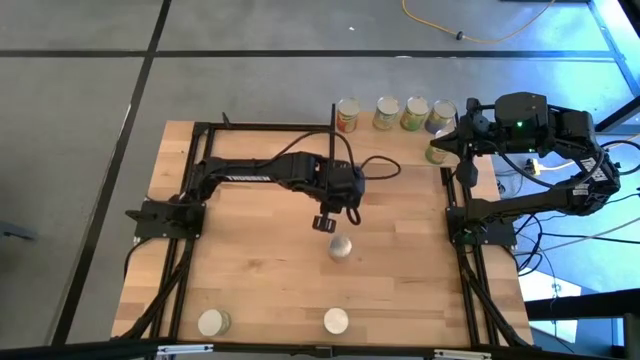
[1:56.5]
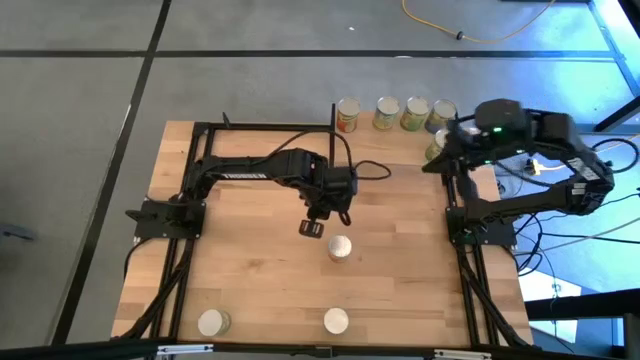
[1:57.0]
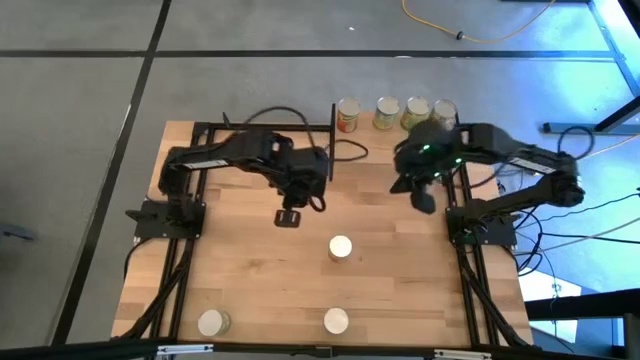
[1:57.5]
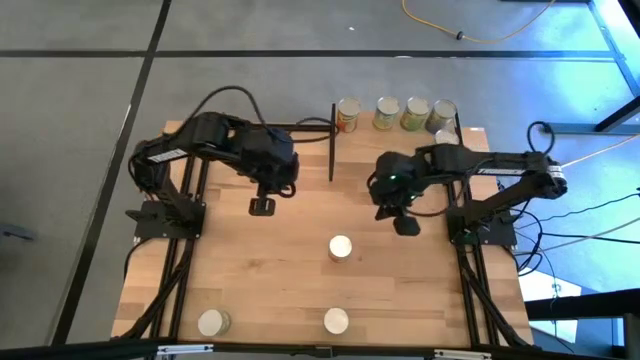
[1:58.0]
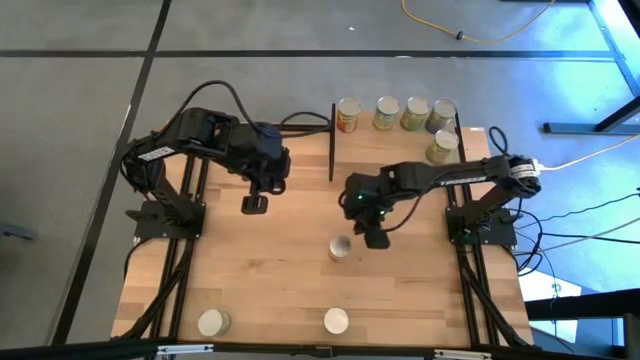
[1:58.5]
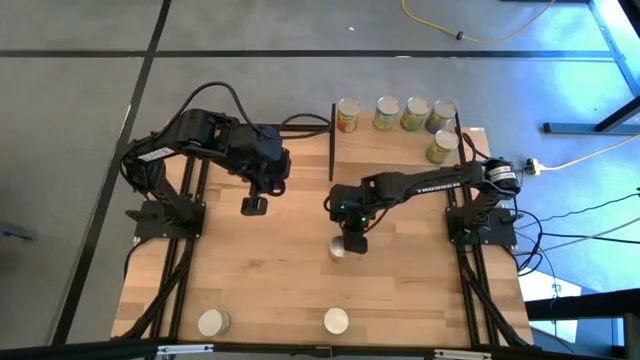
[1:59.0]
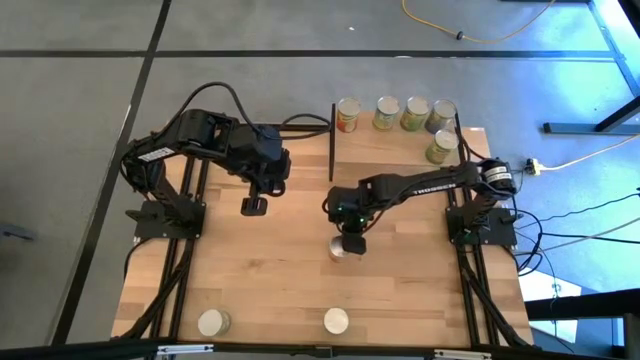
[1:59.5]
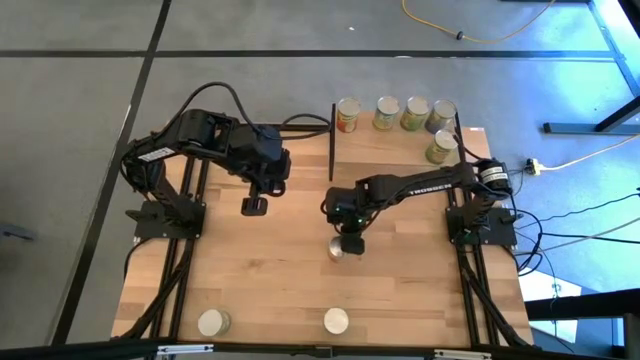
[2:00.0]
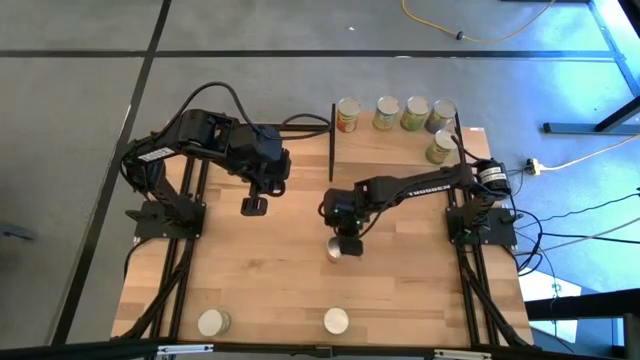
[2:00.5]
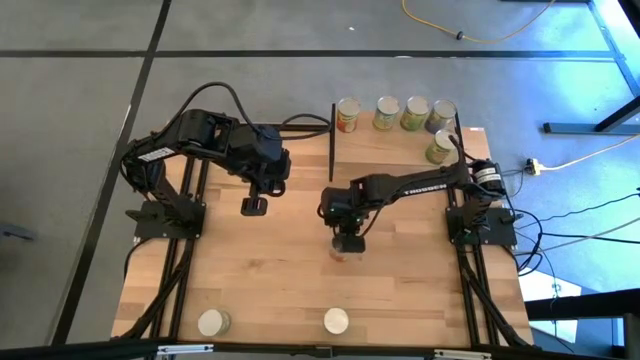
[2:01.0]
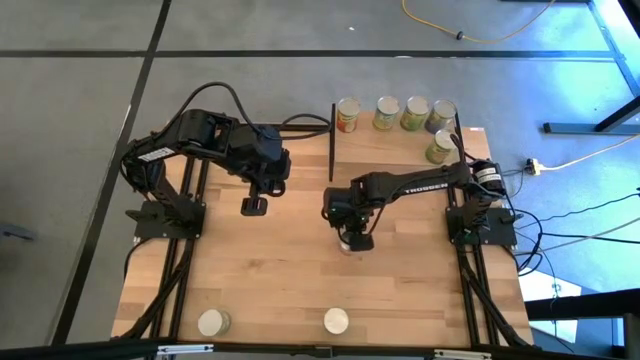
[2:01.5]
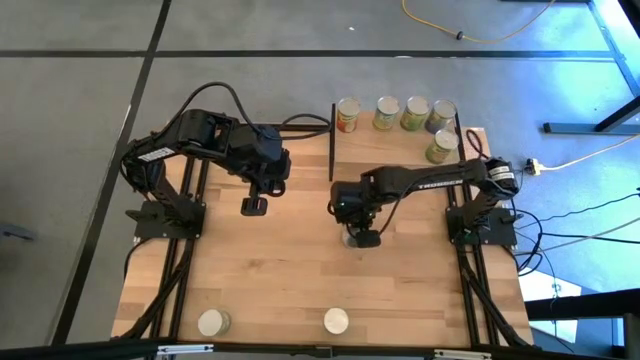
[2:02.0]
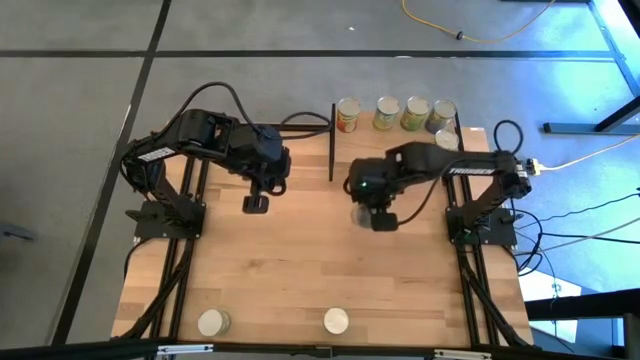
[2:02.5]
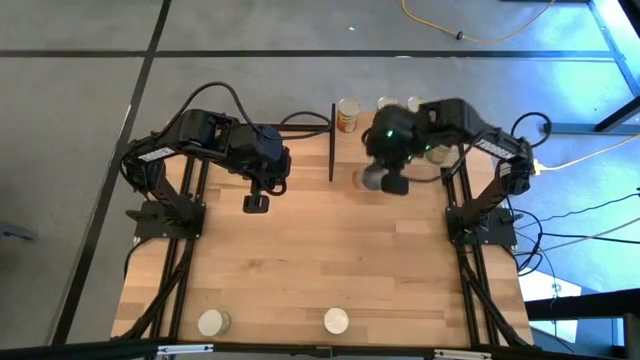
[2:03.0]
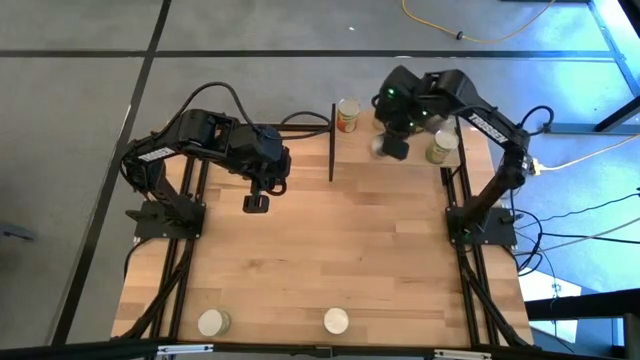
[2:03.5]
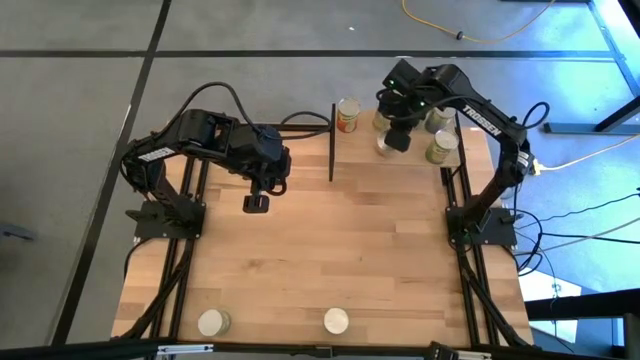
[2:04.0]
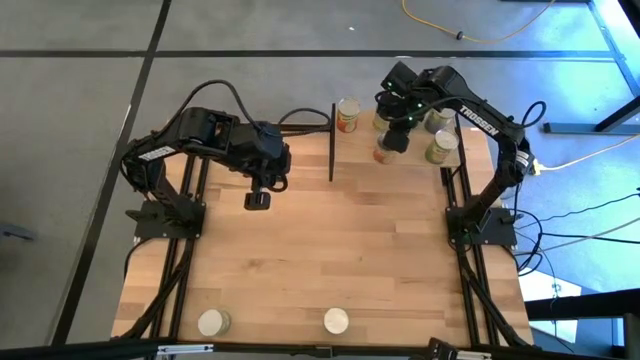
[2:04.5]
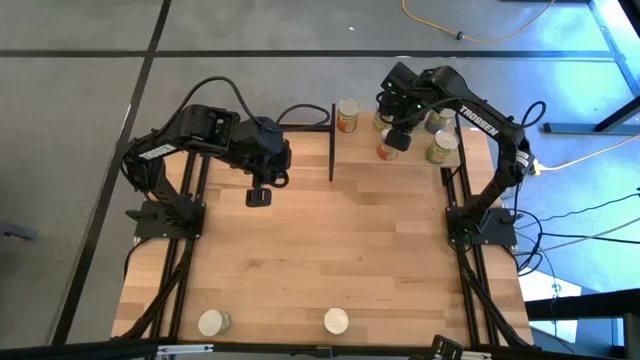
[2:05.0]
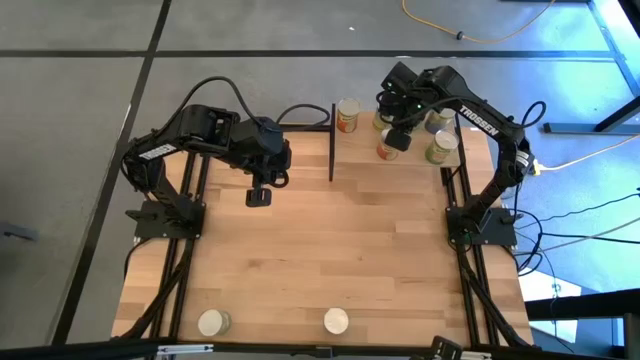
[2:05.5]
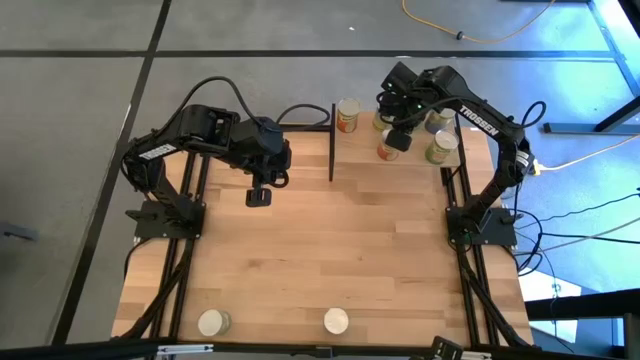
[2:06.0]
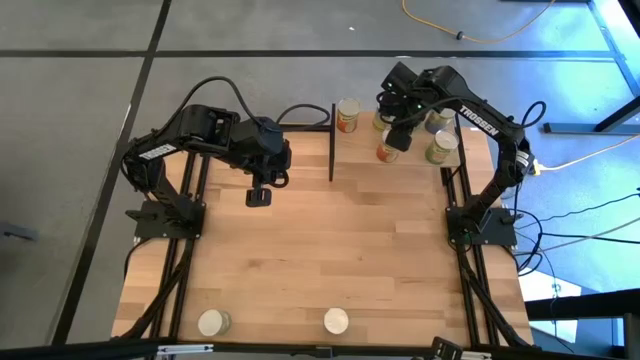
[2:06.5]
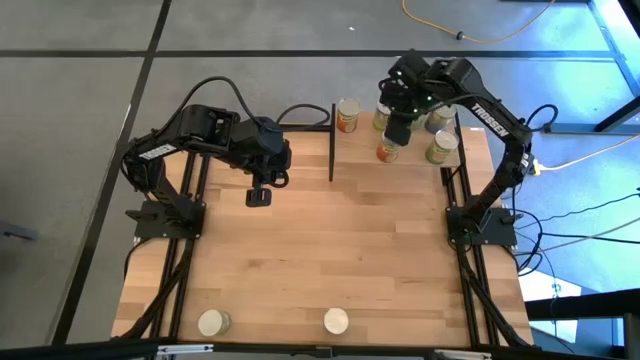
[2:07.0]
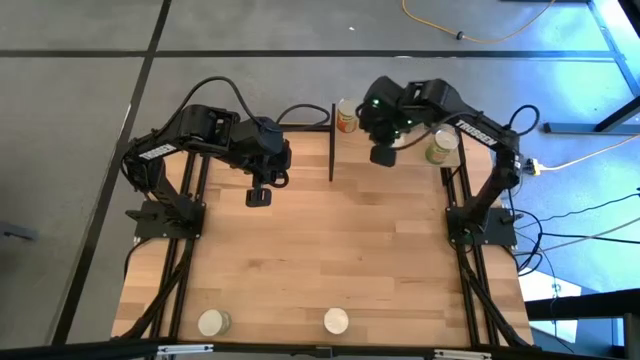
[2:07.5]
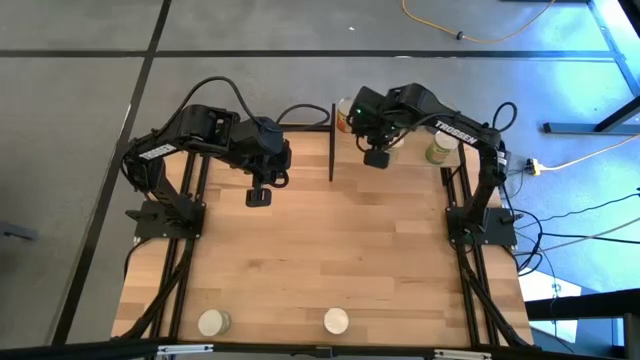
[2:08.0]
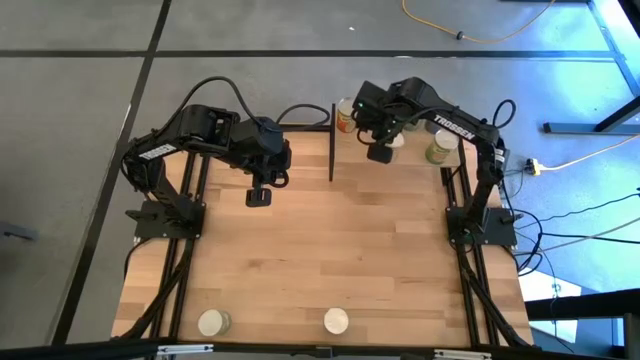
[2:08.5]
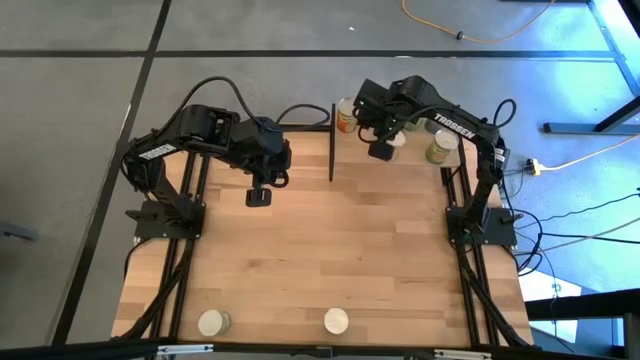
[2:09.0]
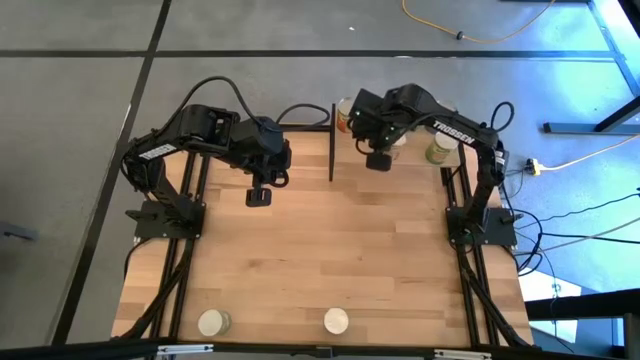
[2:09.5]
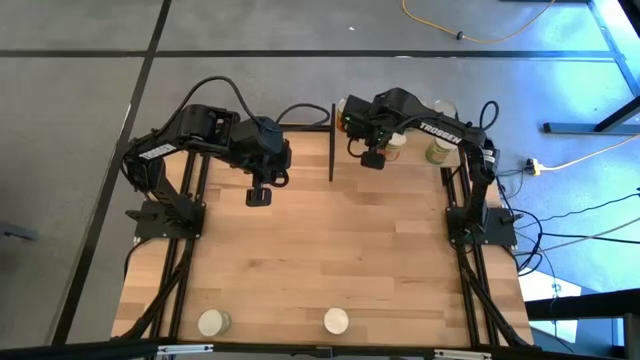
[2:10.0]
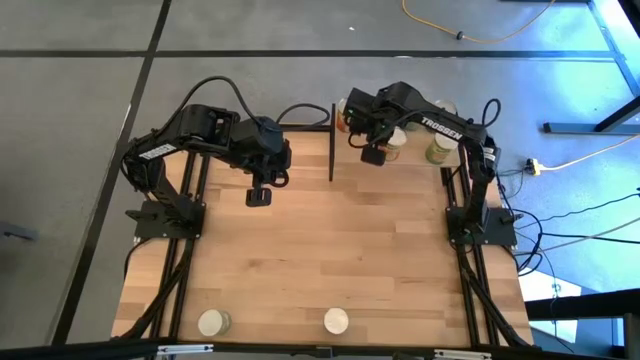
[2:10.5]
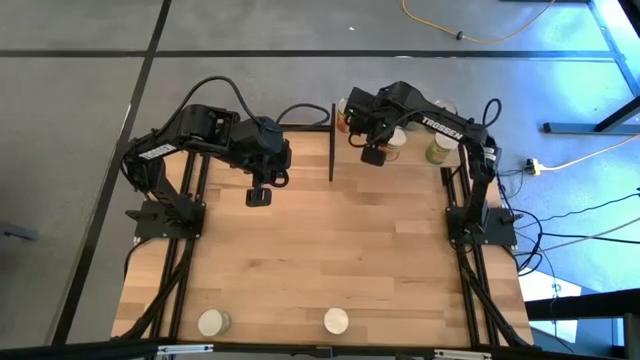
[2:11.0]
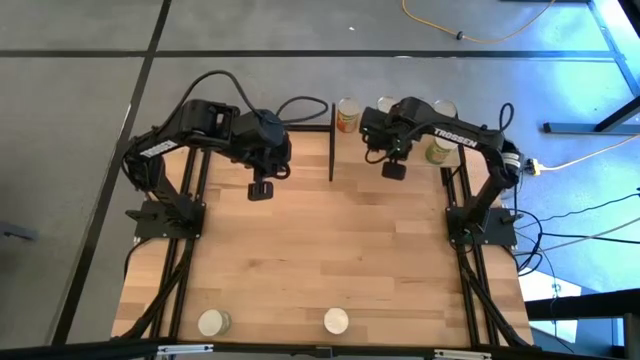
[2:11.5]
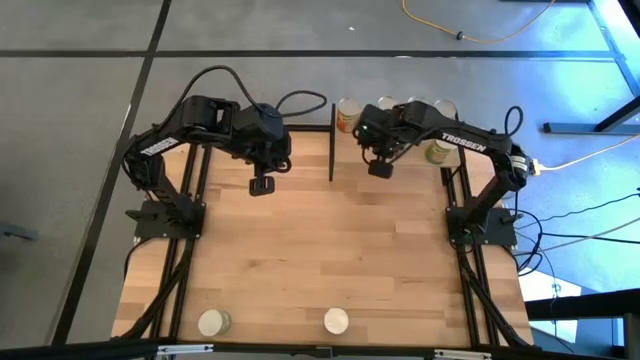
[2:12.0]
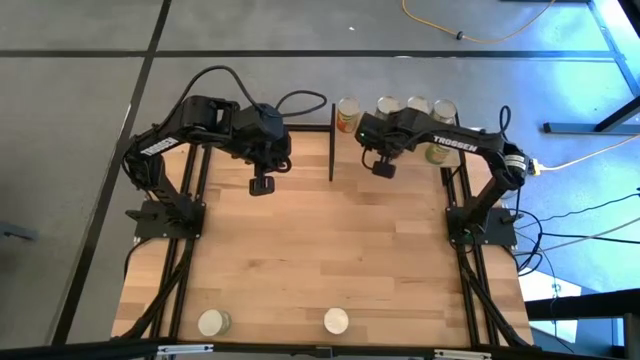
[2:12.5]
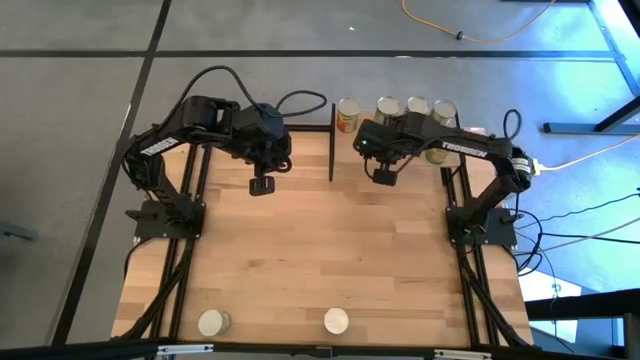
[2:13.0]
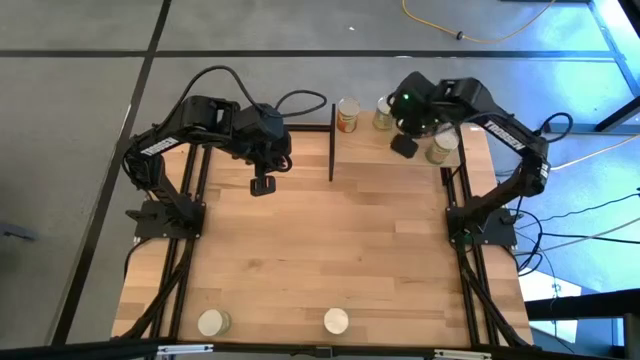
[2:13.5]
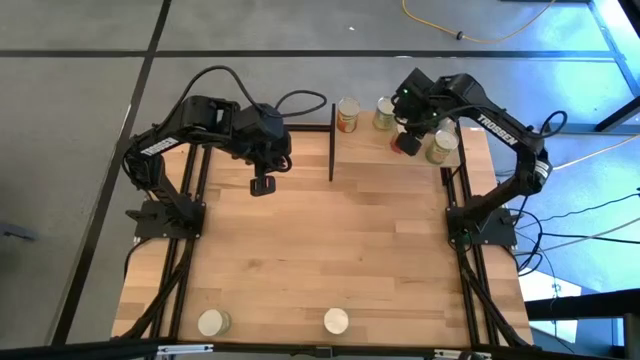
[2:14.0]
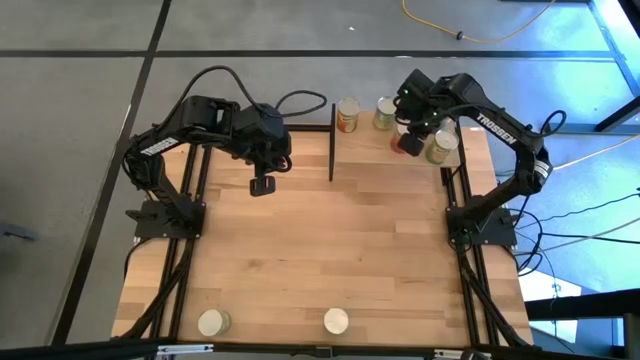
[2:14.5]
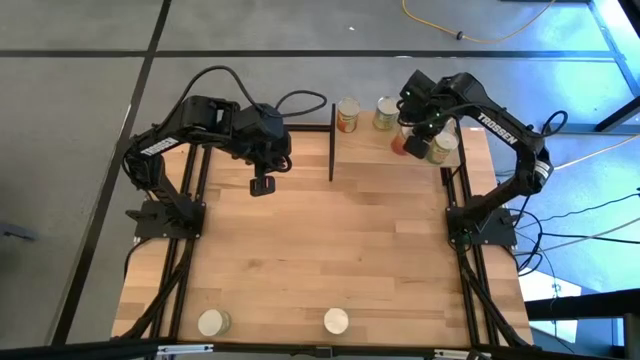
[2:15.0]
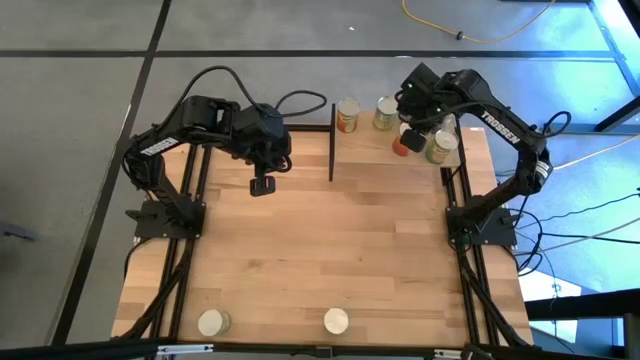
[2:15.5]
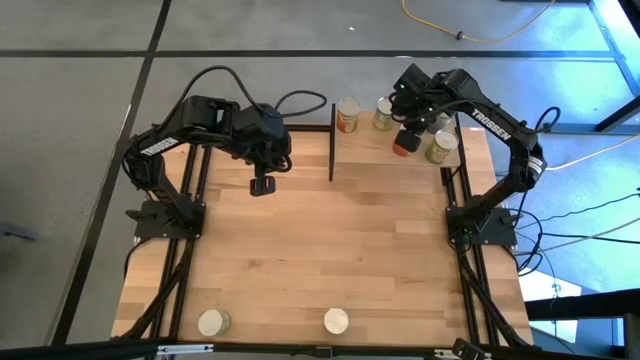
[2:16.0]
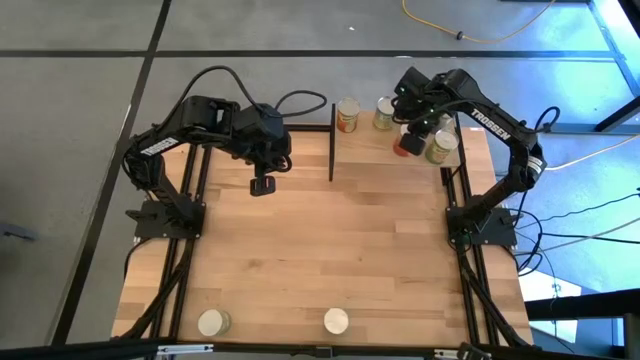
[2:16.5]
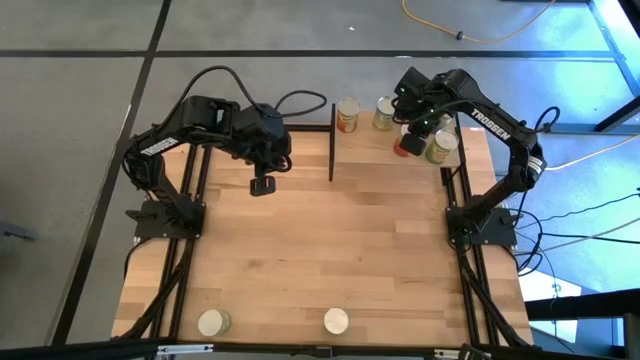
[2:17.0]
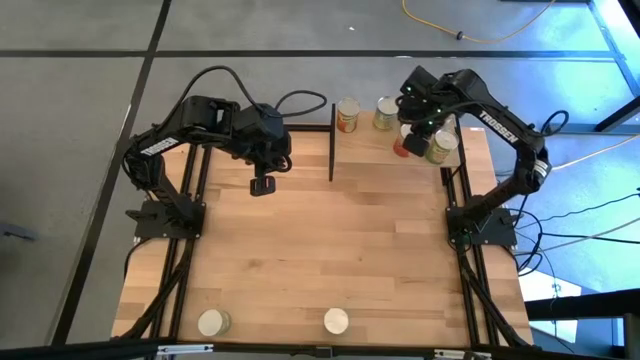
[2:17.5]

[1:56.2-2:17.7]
Task: Pick and place cans onto a shelf
Put the canned pineapple on the shelf
